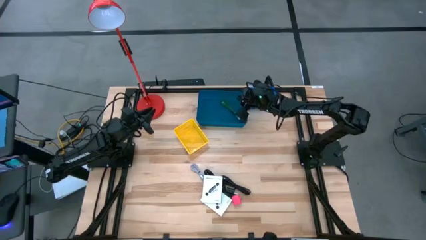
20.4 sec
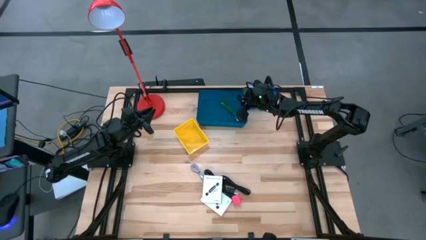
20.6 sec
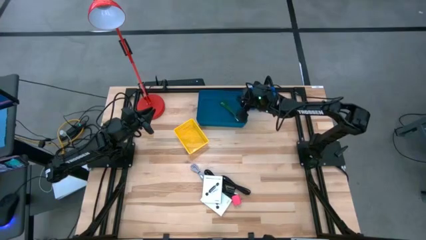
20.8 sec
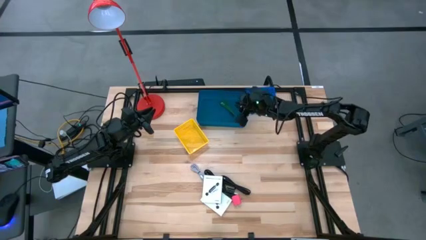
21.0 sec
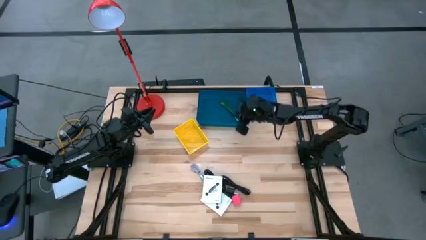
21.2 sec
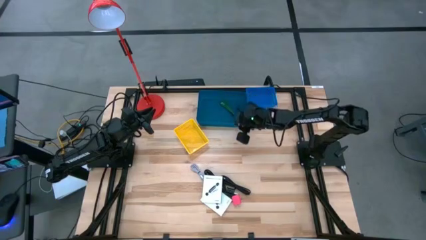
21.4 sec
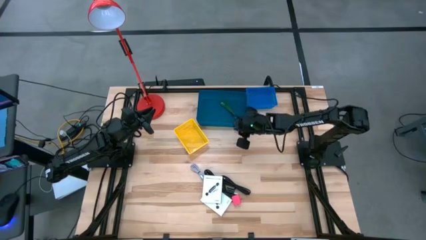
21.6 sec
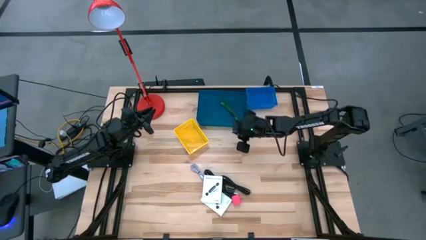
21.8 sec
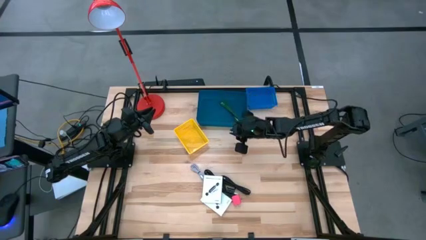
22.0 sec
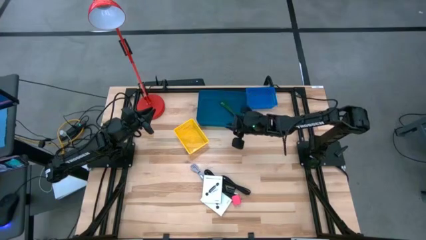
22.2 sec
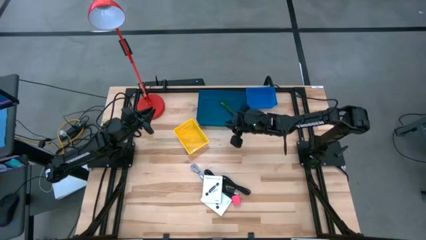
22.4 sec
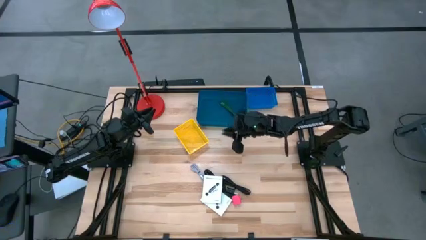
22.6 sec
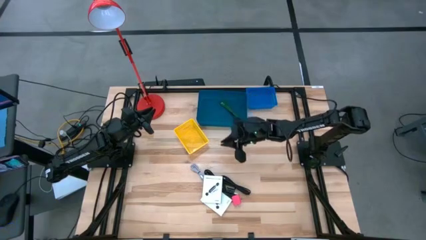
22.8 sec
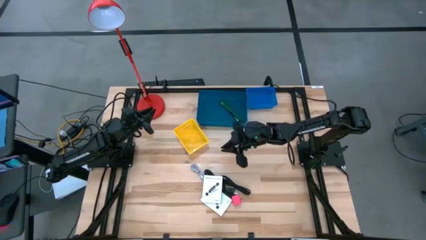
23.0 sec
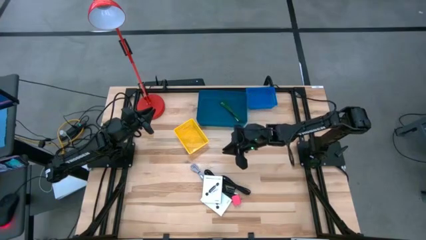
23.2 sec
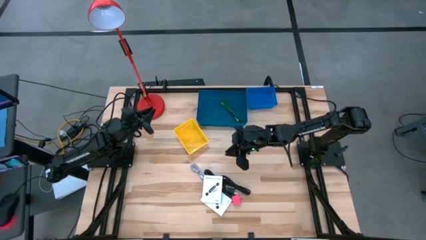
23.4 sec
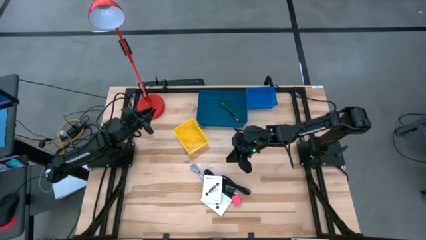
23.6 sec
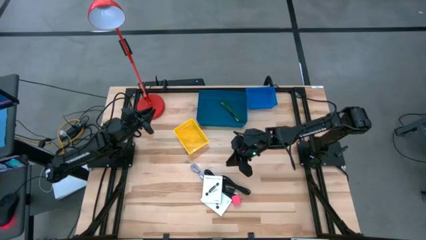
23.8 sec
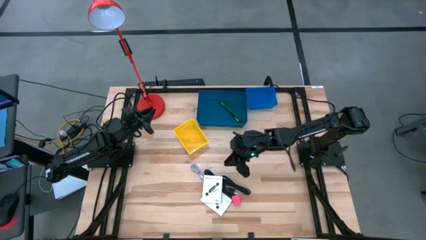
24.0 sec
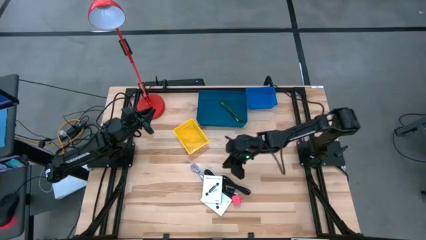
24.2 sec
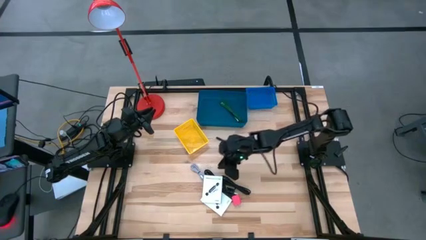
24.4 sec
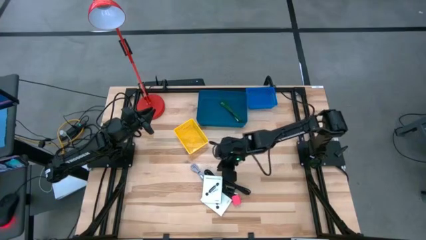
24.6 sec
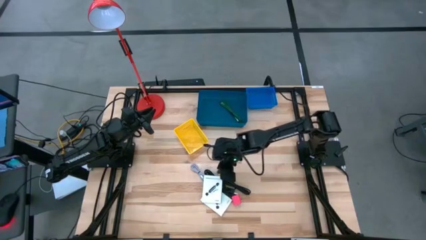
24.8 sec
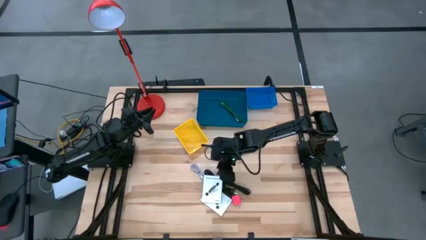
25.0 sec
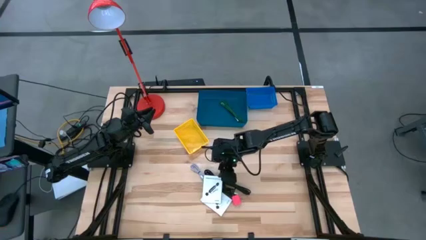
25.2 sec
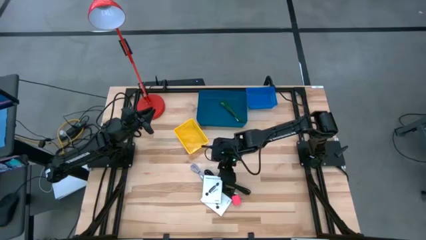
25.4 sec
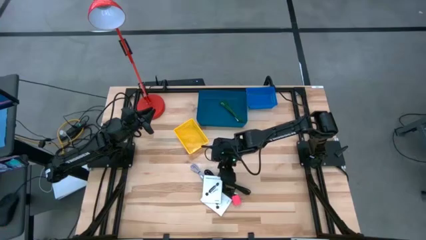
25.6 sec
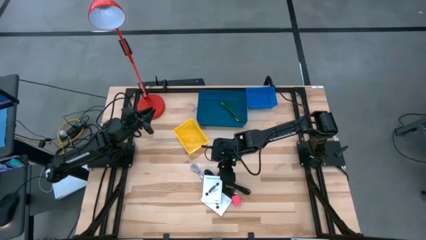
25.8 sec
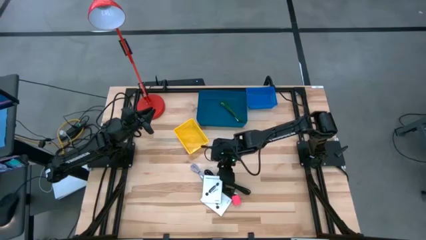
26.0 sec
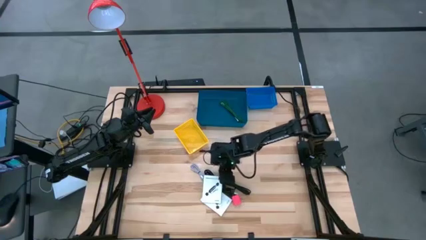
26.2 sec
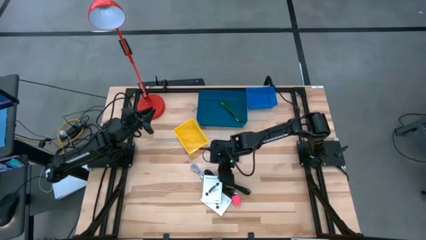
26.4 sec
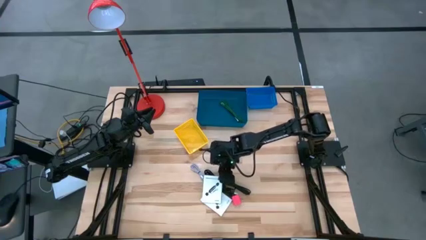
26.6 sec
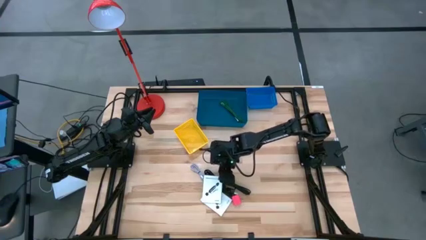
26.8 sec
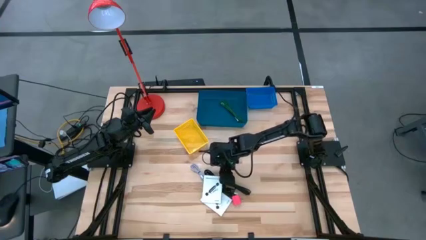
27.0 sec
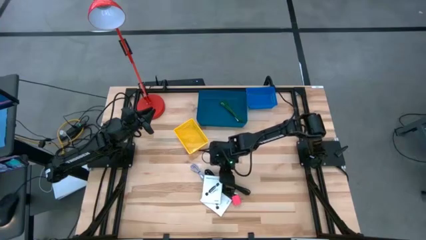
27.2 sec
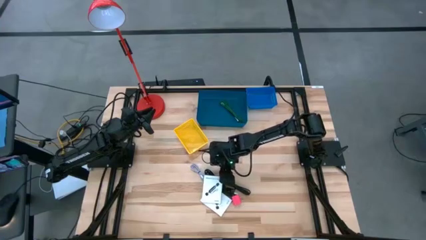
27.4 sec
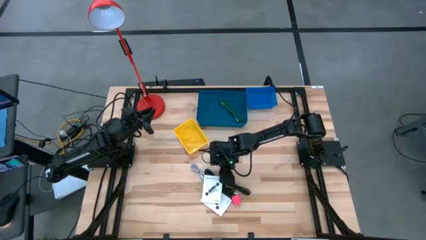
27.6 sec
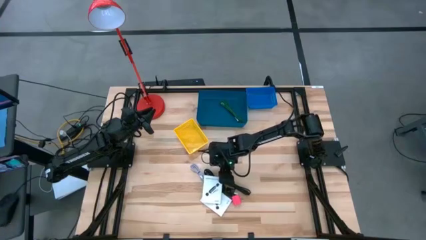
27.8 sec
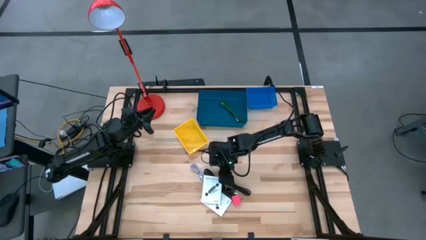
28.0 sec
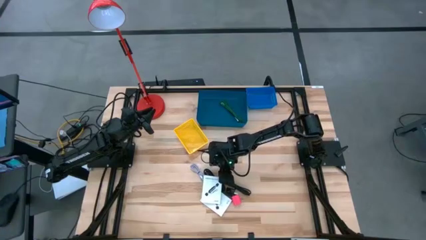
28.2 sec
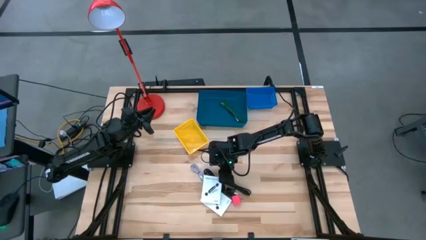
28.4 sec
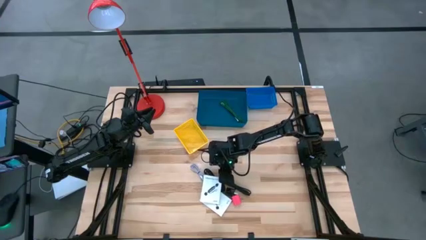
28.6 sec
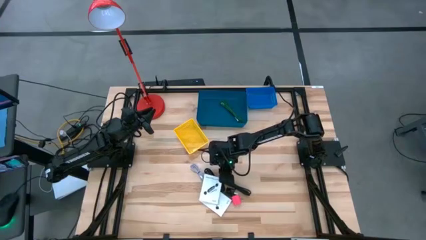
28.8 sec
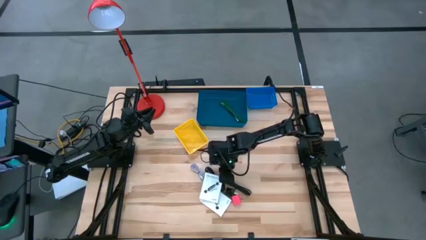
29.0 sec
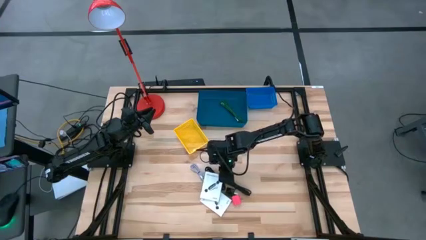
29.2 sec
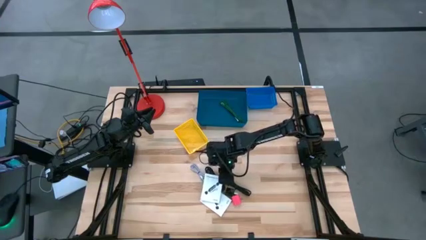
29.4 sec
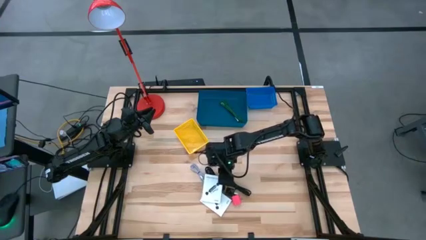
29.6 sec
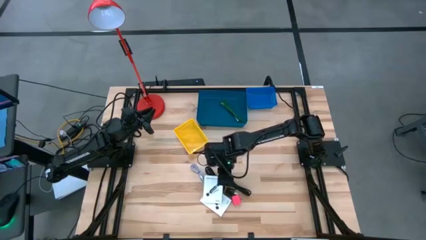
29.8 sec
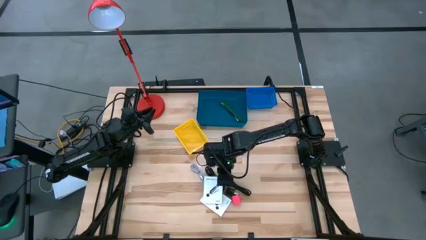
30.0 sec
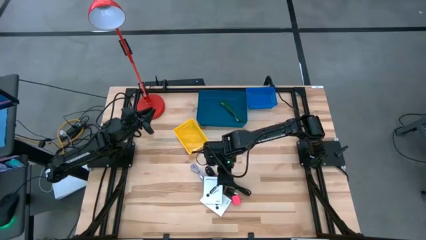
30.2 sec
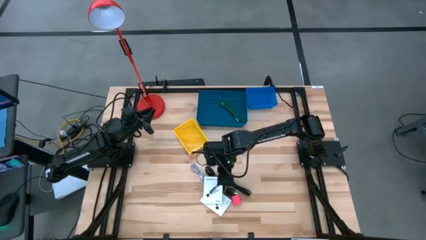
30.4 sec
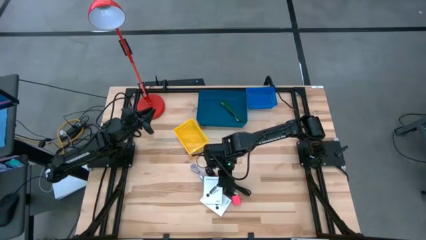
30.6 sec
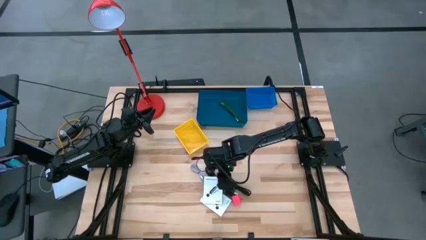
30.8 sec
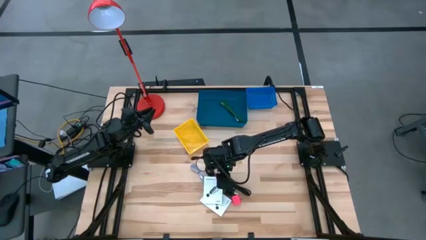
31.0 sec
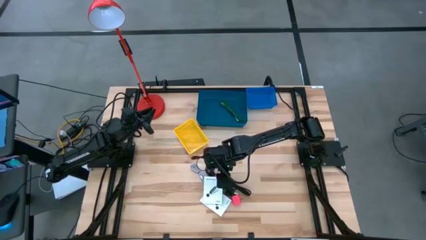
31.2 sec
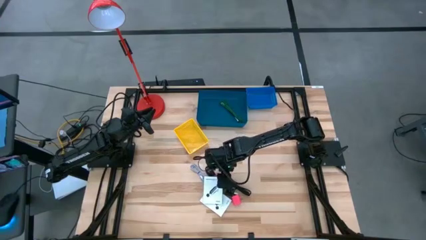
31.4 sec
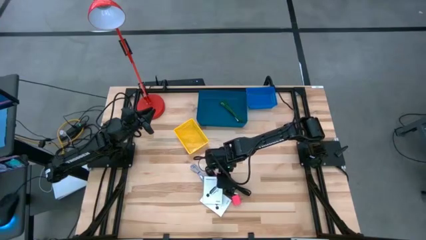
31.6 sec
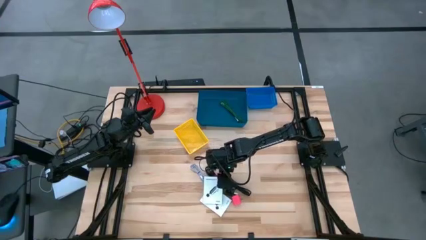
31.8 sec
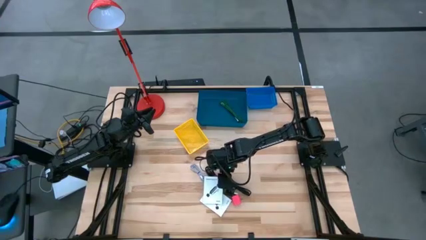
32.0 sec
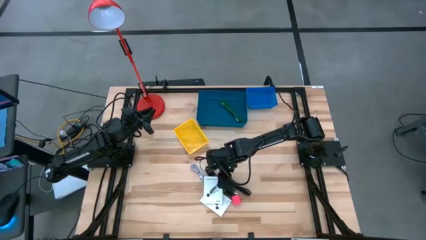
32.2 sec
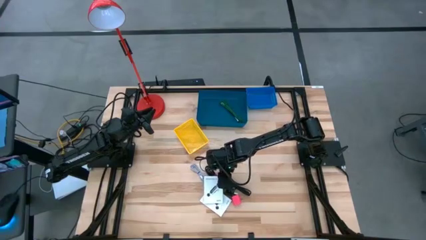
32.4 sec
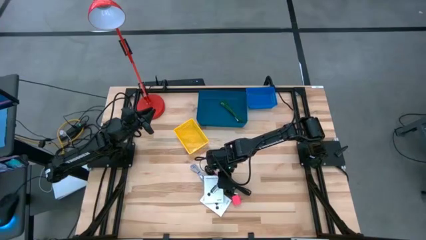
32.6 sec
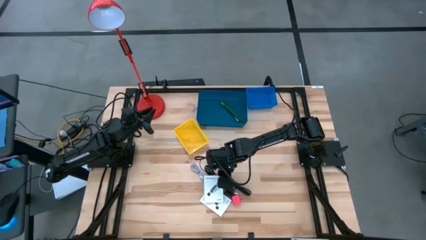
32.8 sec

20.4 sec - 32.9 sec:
Task: Pick and place items into bin
Put the top white card reader box into the yellow bin

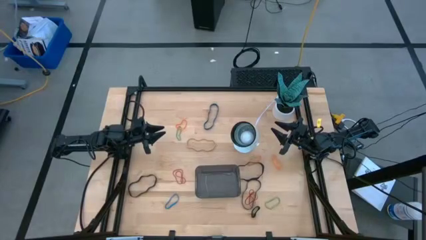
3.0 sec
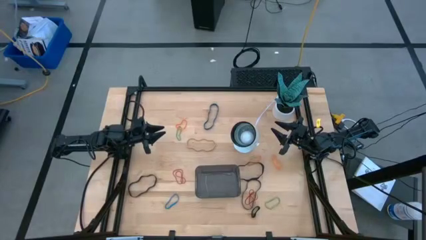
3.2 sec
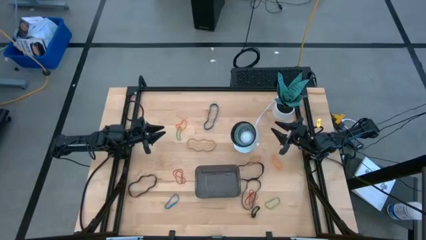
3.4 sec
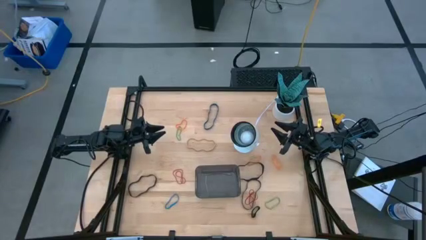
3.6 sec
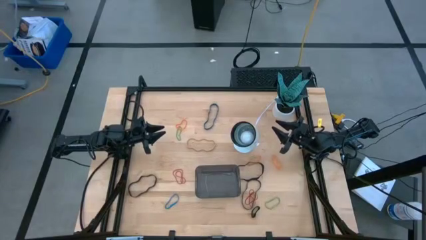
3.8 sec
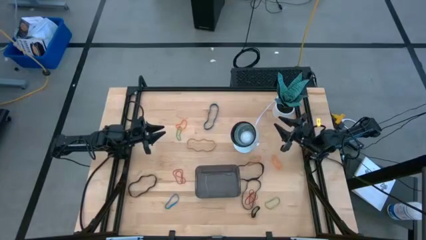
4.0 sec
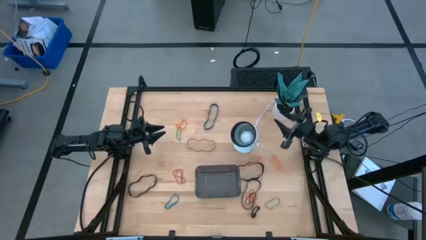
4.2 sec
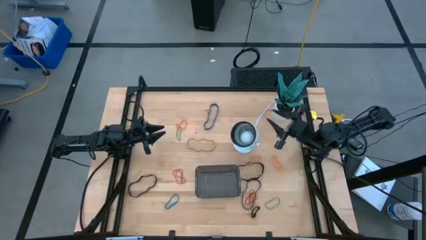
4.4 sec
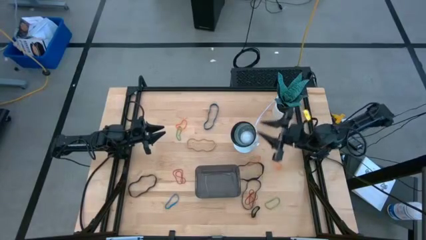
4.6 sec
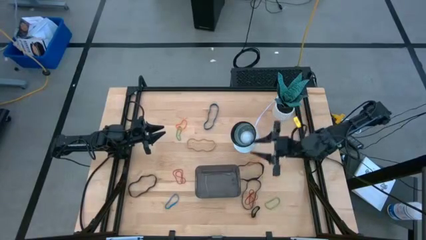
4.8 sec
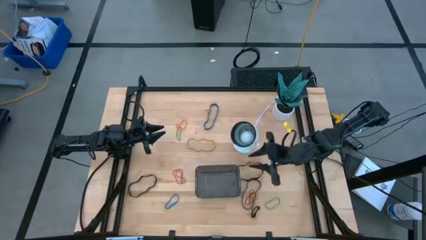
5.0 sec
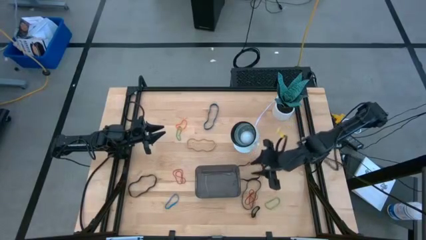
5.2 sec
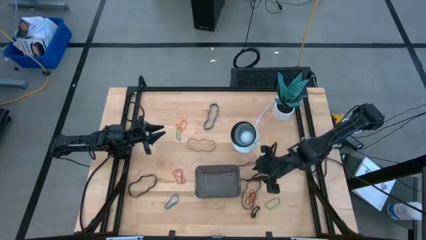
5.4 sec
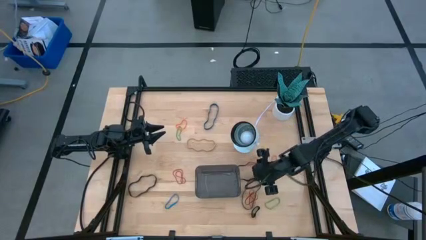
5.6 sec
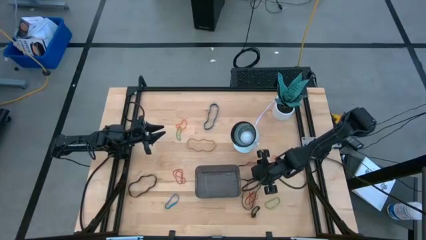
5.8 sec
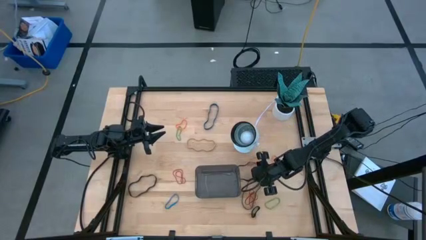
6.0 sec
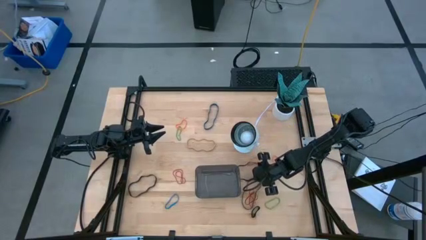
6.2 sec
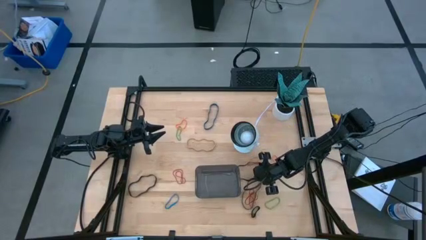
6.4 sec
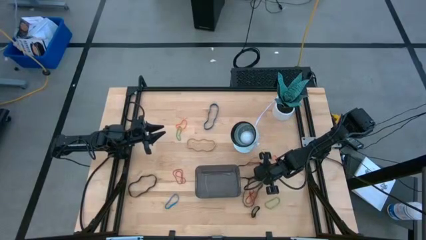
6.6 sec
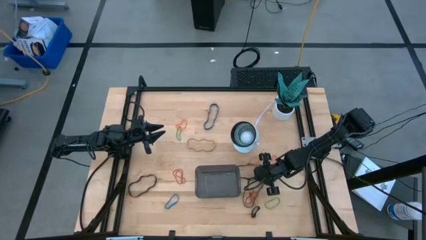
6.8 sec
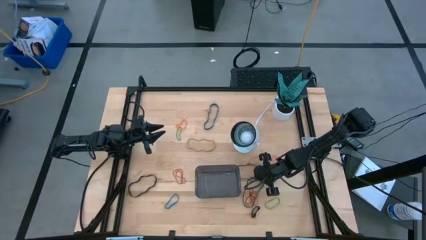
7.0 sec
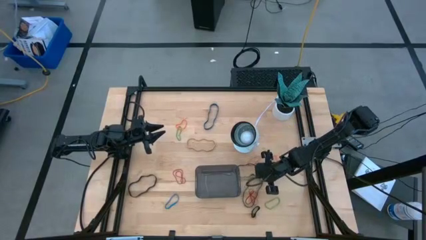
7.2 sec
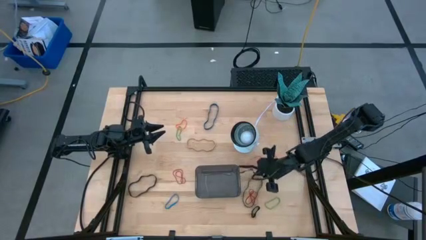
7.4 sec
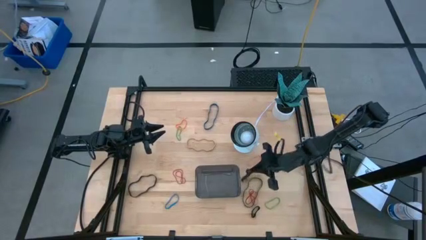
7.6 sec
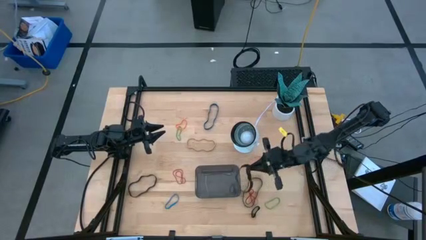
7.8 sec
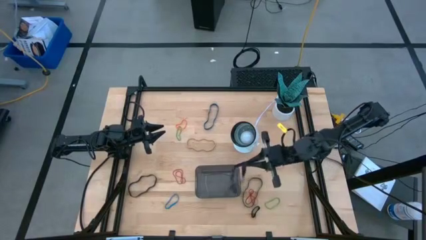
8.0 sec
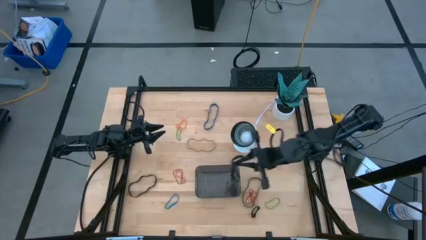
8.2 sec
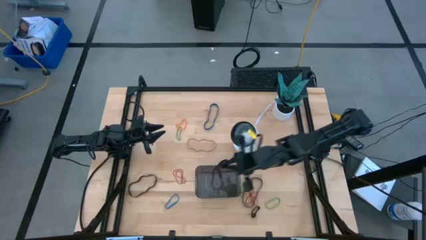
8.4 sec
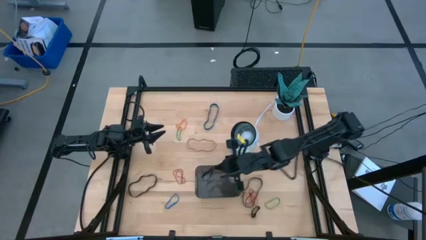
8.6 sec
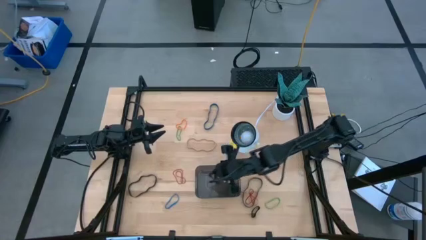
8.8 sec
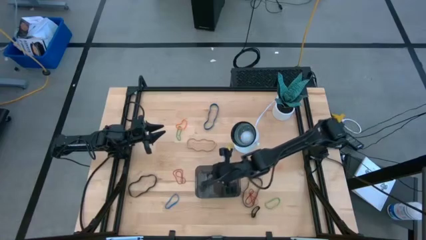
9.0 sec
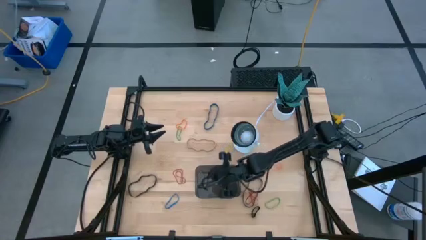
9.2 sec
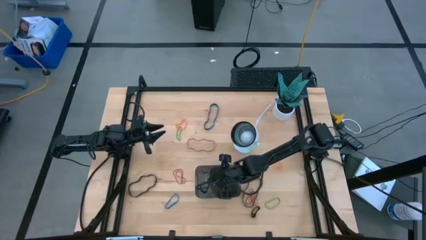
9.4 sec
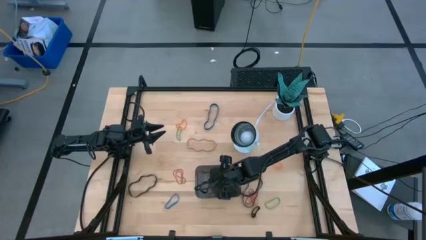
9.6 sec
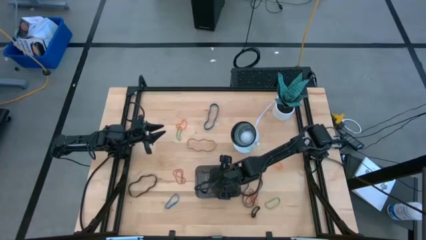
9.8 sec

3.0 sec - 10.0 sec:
Task: Pick and place rubber bands into bin
Put the top right large black rubber band into the black bin
